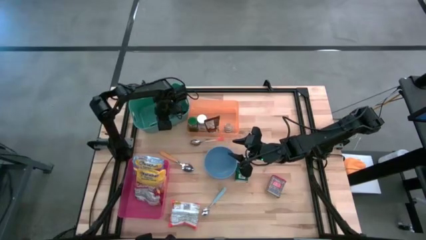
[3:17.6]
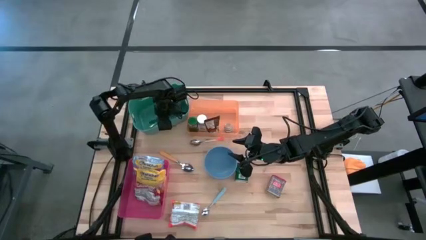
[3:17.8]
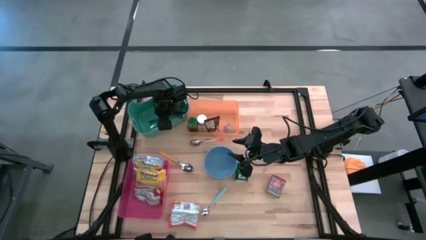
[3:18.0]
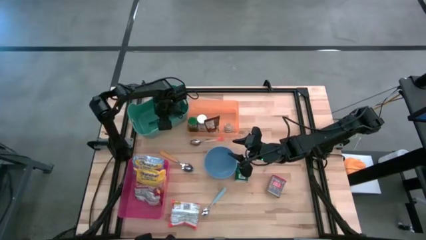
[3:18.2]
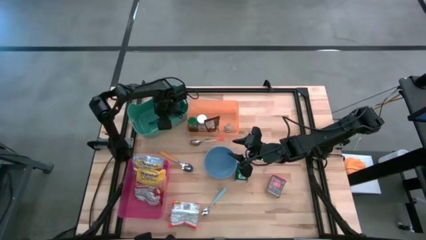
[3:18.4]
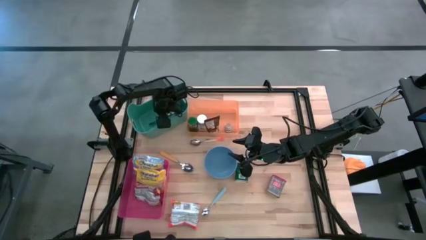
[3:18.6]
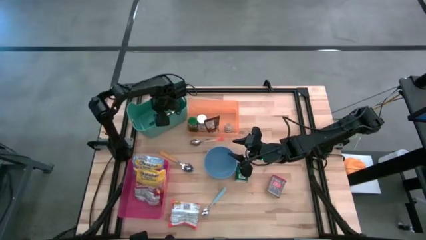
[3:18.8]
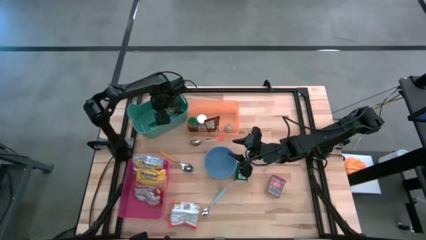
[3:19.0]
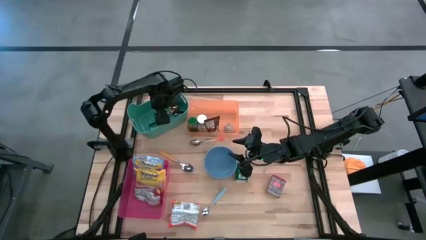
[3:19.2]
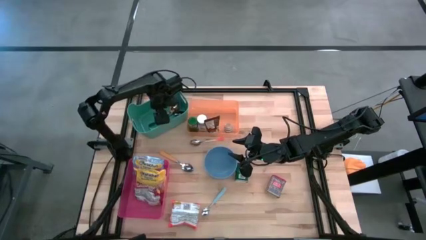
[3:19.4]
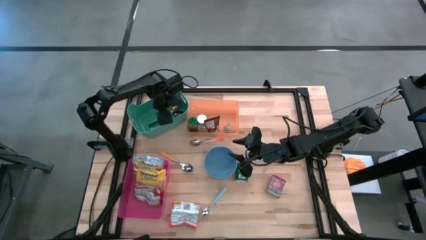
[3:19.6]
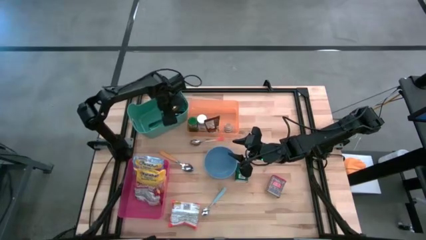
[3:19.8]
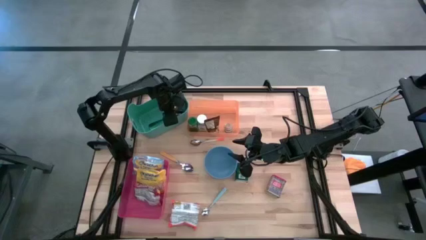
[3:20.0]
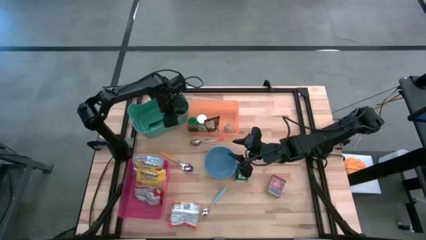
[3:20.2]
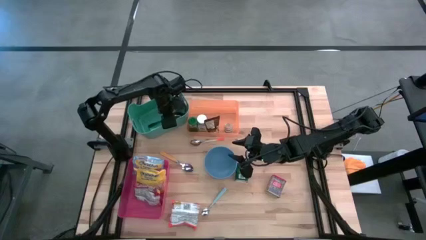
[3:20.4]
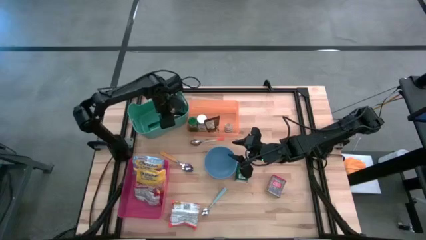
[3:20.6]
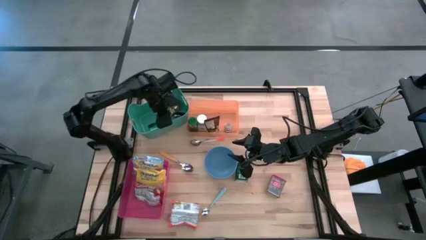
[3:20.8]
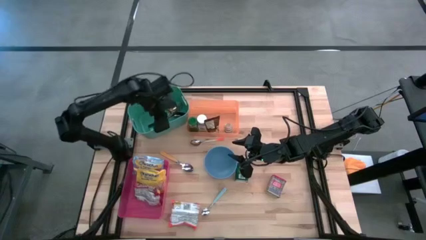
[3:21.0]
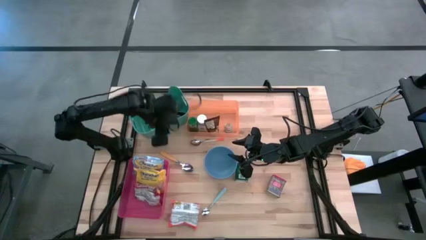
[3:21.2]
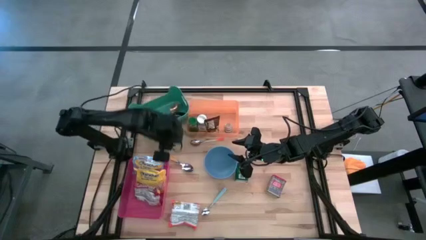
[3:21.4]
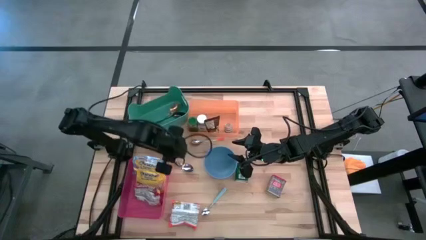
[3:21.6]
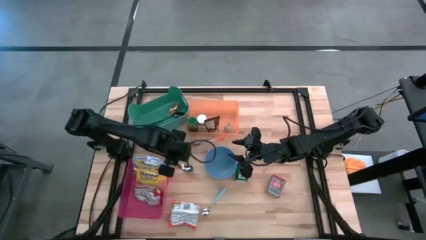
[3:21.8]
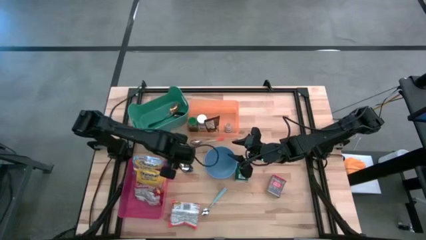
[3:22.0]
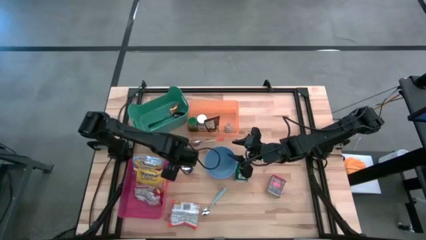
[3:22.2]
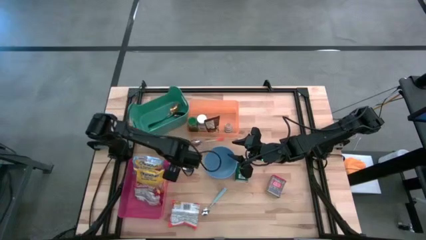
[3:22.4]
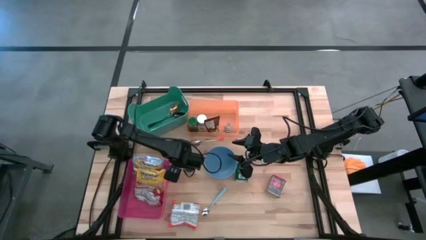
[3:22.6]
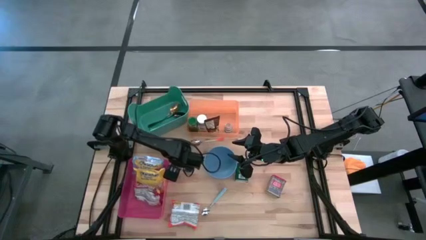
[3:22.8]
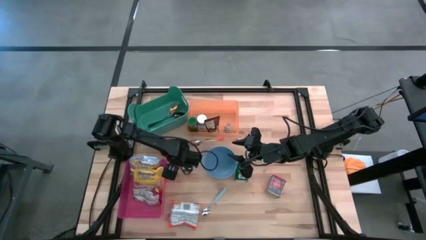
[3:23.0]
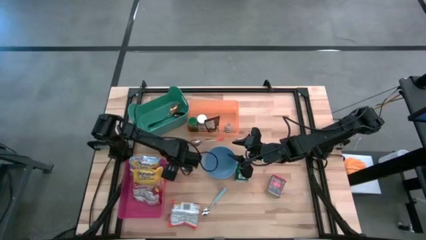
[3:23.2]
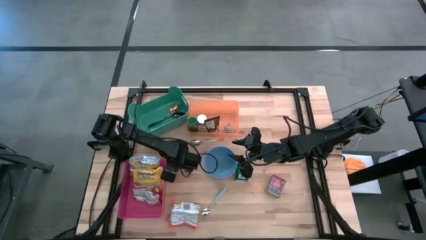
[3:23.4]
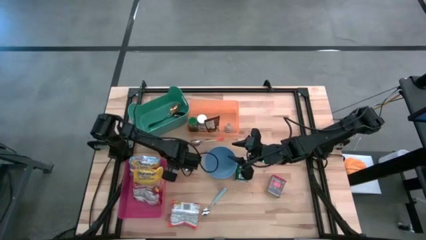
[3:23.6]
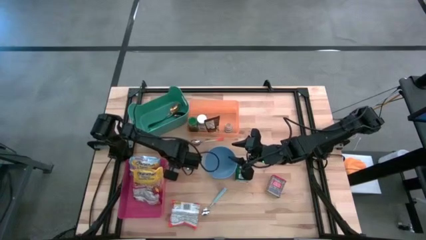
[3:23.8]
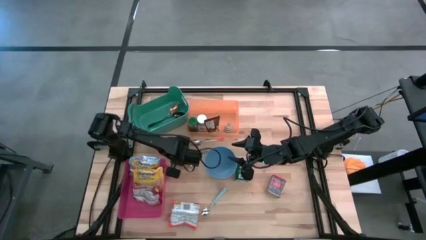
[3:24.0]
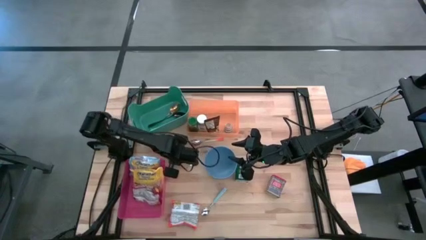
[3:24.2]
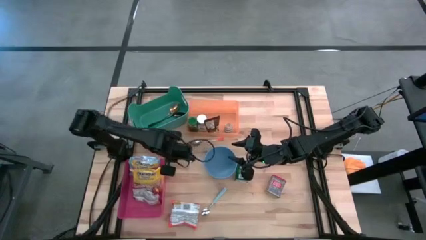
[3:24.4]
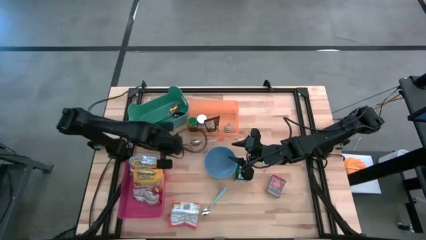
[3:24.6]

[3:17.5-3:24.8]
Put the yellow spoon into the green bin

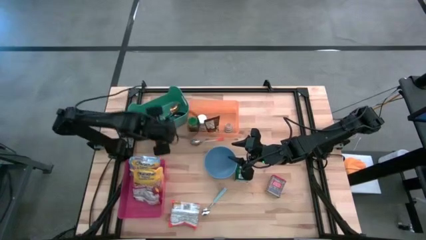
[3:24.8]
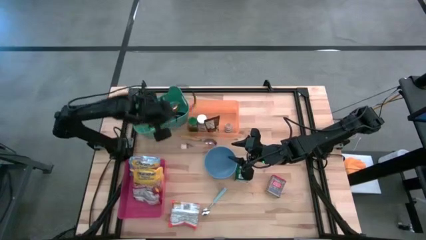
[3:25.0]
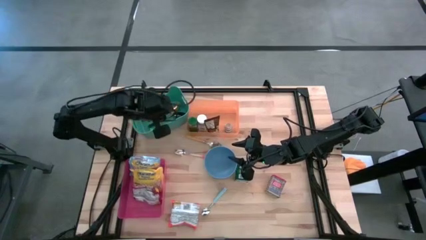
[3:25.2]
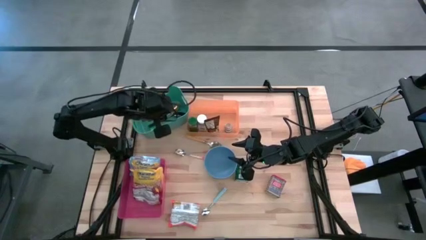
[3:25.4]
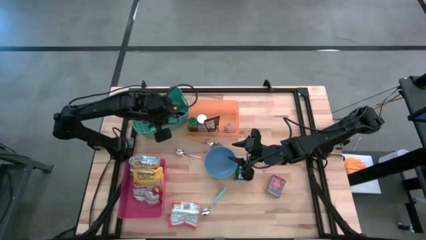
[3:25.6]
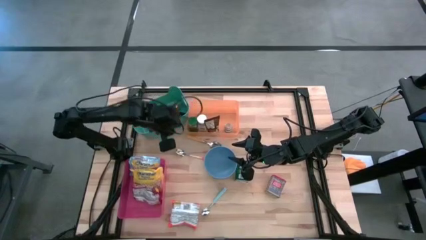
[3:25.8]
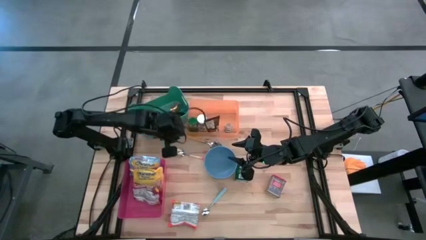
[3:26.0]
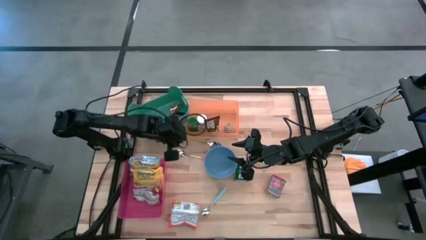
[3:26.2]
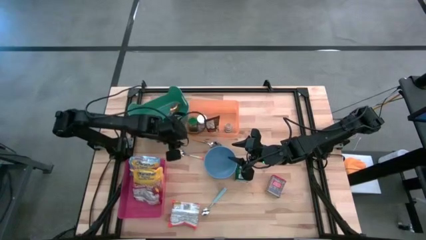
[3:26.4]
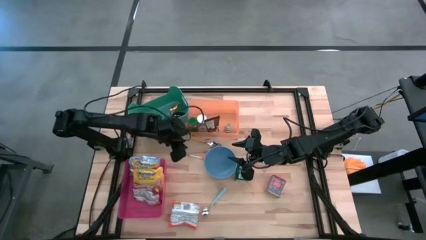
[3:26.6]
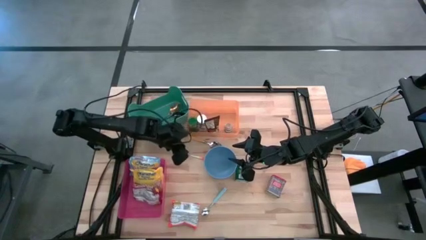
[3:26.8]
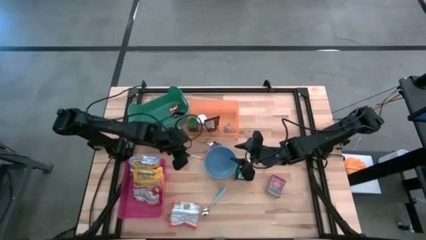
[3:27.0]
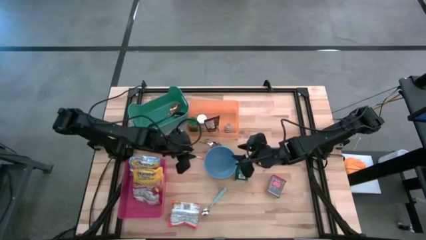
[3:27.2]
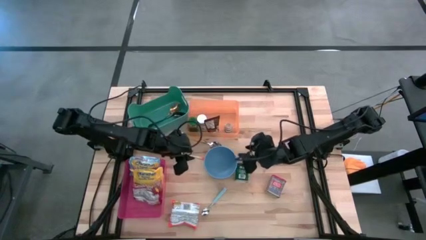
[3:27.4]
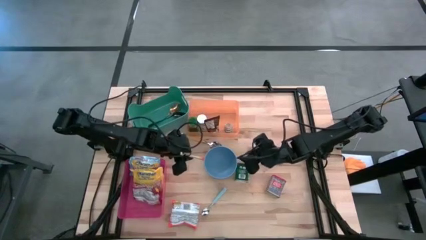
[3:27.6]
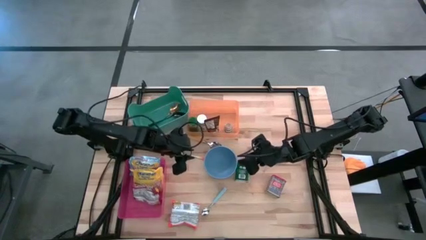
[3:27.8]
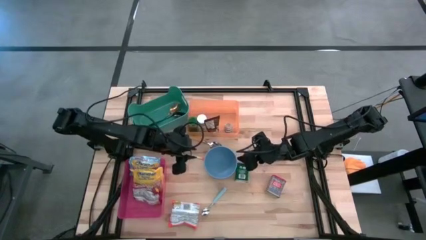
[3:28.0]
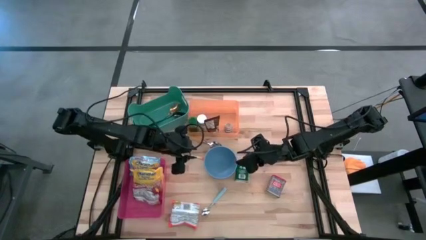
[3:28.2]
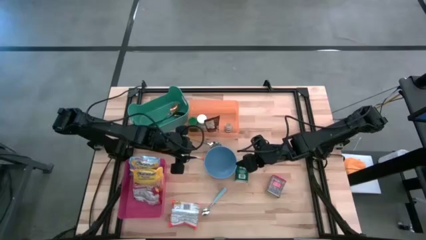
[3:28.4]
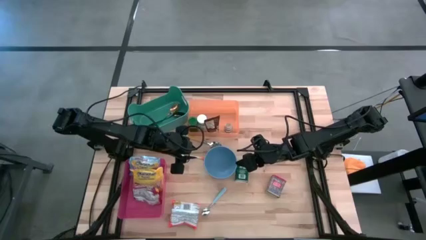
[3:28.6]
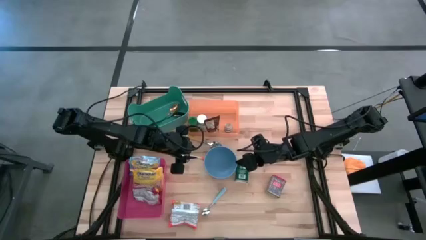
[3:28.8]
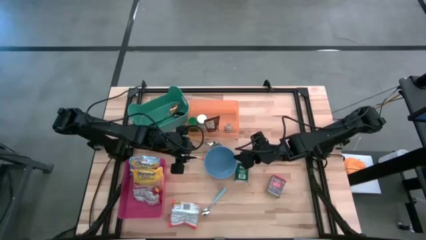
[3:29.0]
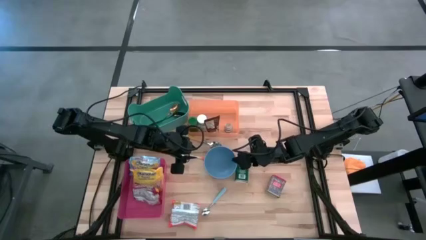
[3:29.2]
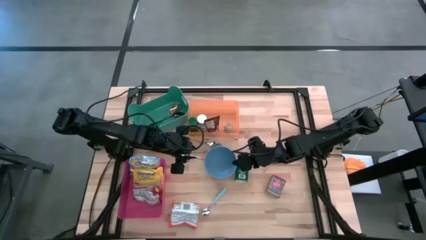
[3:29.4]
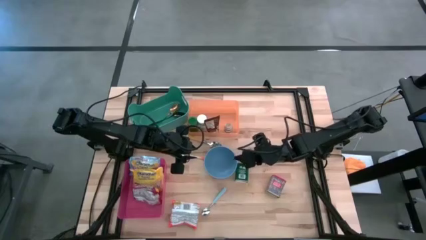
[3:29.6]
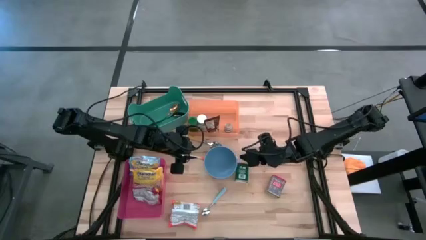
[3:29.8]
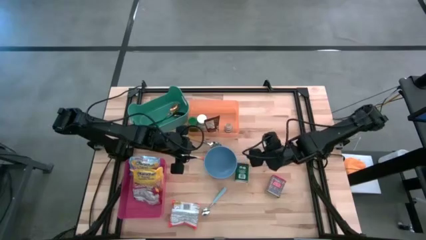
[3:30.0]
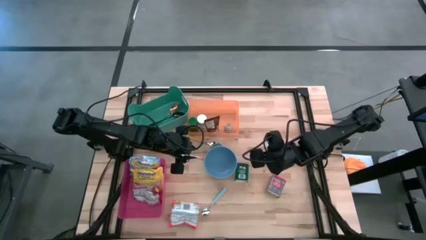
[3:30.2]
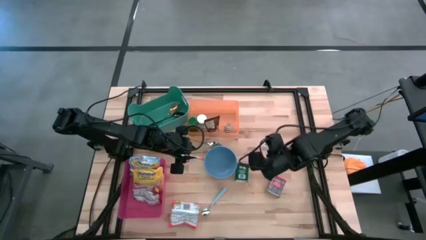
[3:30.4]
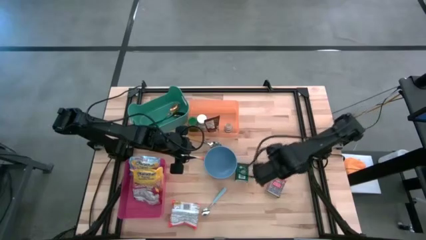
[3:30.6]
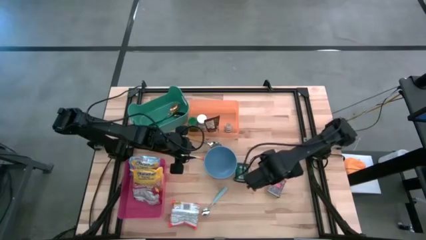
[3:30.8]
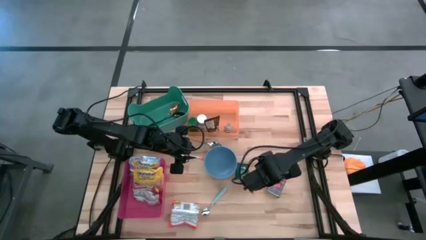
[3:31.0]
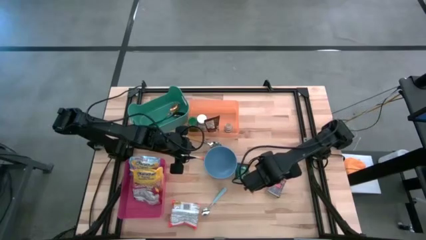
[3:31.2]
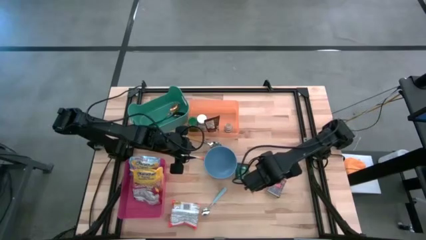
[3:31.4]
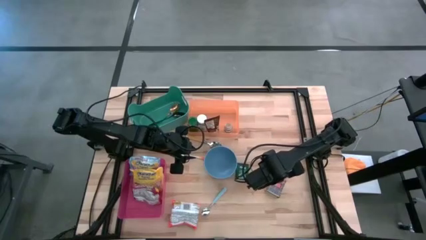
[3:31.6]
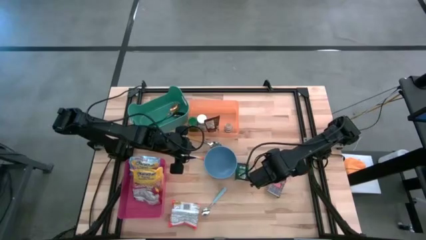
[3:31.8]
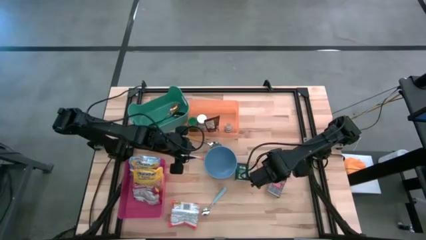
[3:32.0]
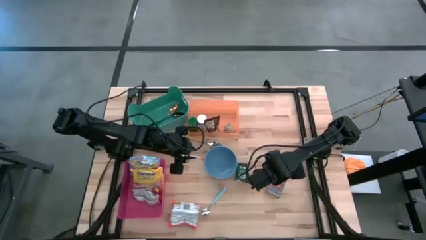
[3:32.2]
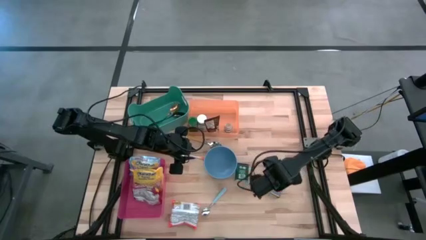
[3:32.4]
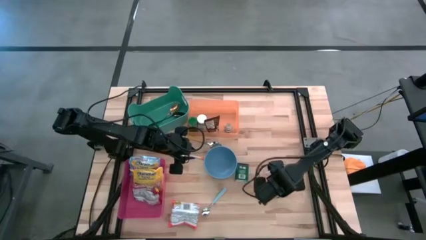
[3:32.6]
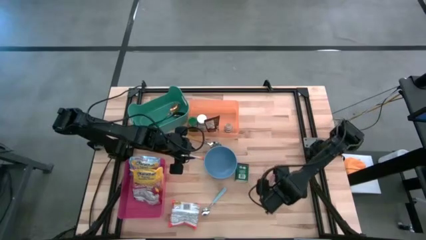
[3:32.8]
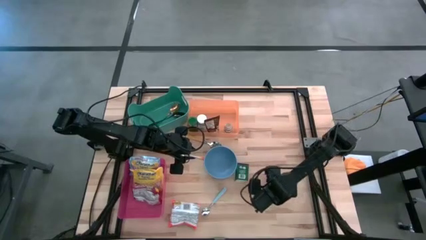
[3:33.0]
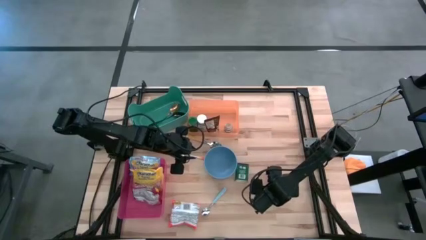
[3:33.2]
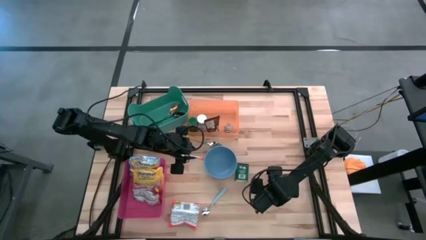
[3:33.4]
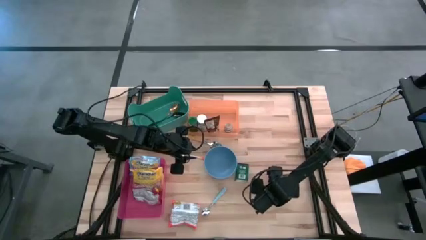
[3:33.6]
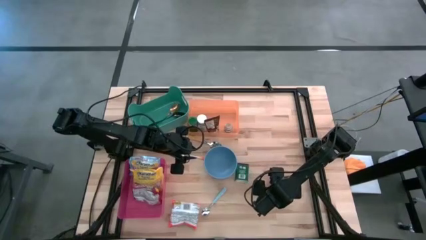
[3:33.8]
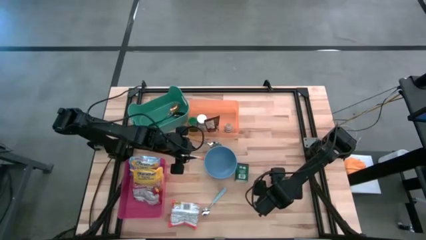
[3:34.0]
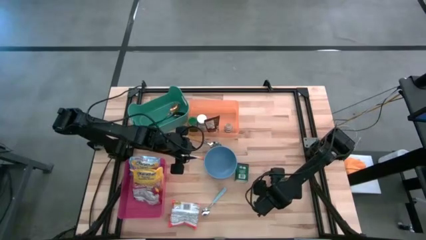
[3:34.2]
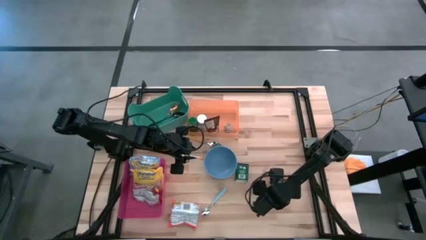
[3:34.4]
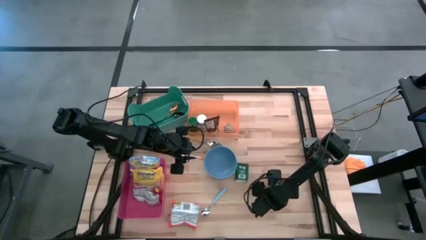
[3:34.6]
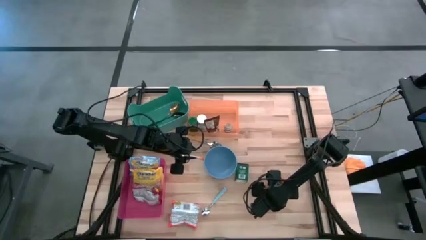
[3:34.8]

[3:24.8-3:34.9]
Put the red spice can into the orange bin
